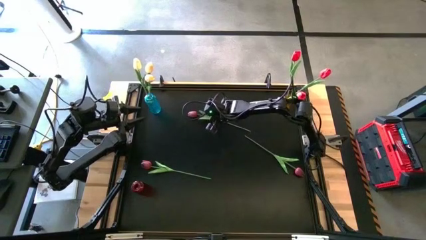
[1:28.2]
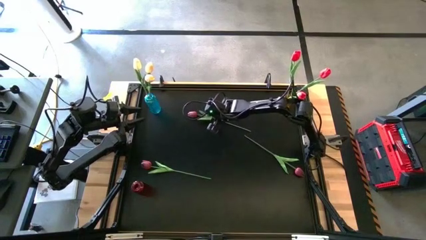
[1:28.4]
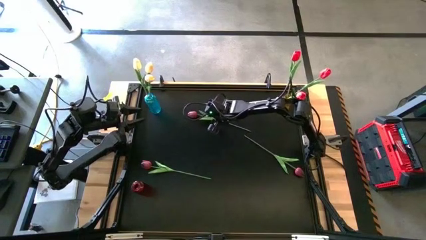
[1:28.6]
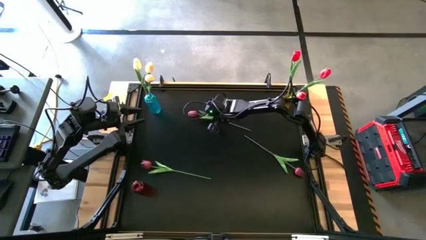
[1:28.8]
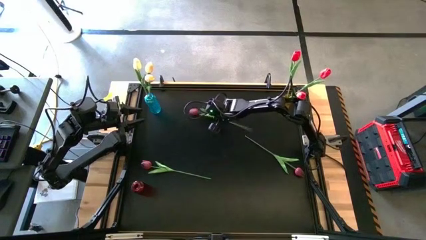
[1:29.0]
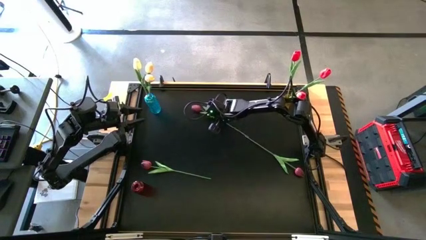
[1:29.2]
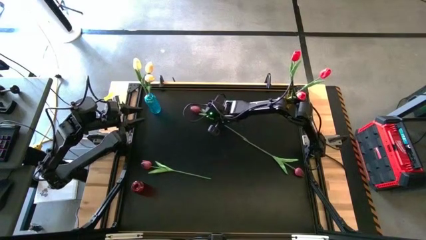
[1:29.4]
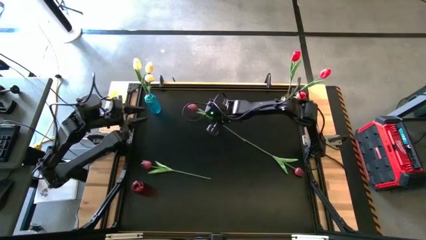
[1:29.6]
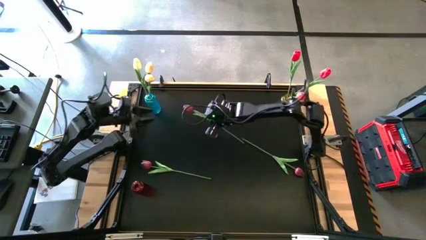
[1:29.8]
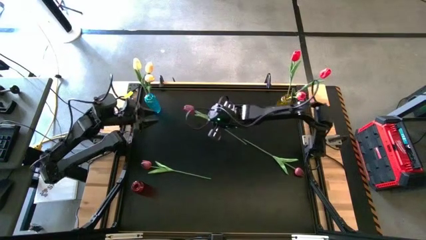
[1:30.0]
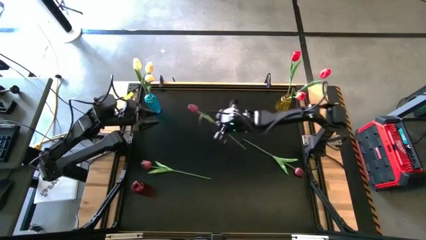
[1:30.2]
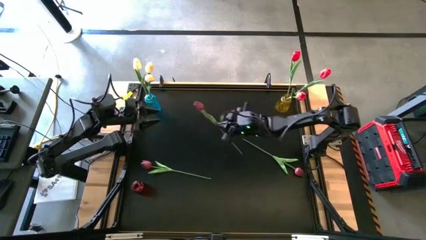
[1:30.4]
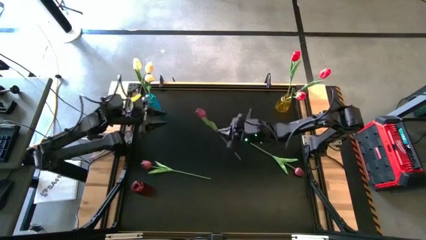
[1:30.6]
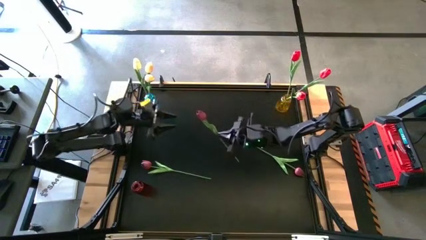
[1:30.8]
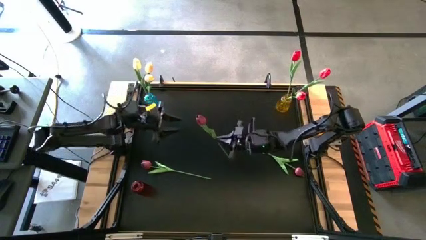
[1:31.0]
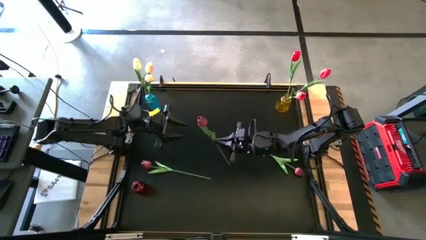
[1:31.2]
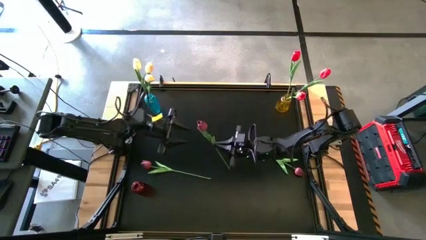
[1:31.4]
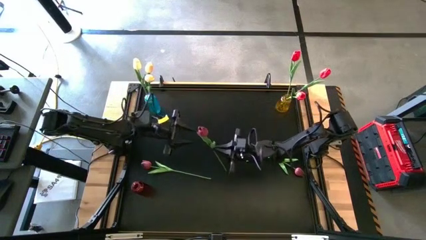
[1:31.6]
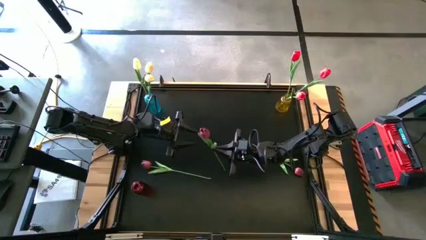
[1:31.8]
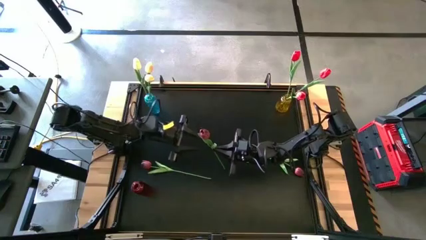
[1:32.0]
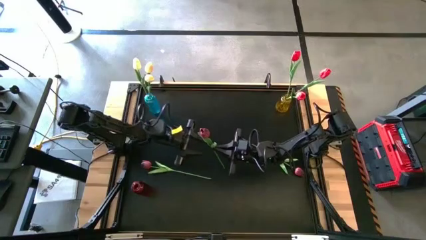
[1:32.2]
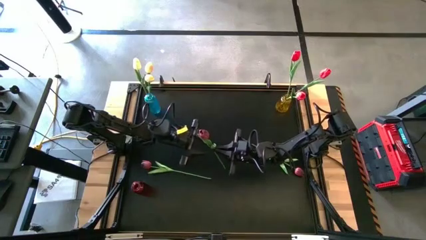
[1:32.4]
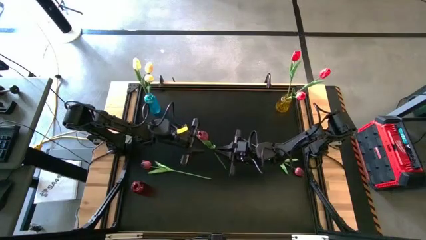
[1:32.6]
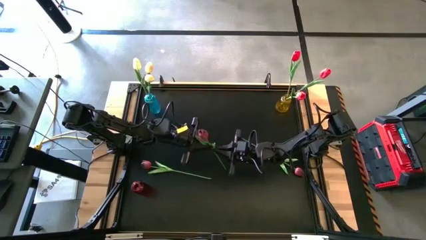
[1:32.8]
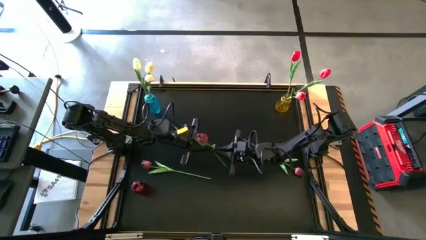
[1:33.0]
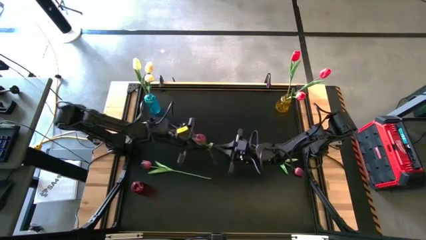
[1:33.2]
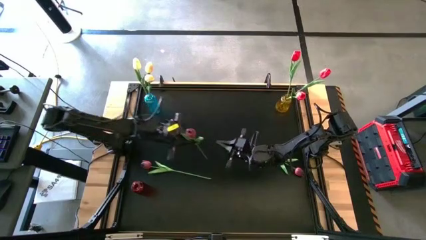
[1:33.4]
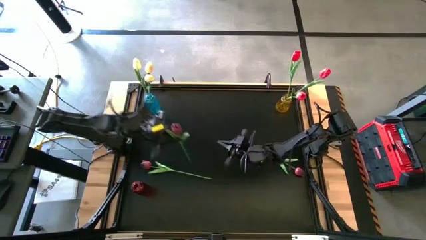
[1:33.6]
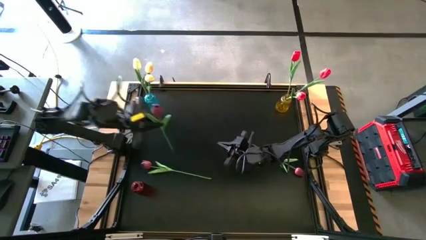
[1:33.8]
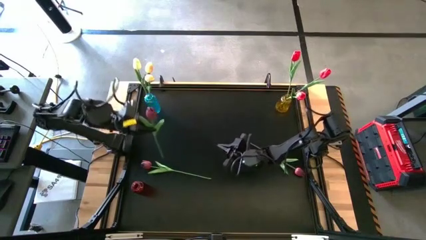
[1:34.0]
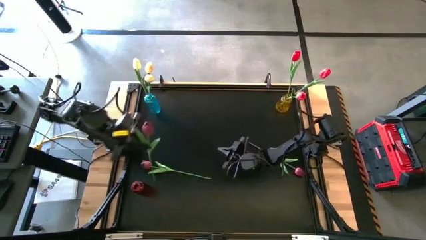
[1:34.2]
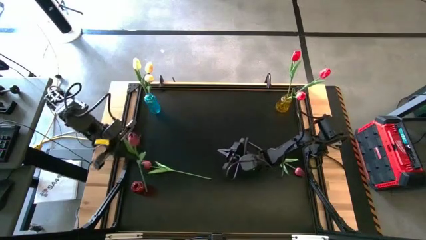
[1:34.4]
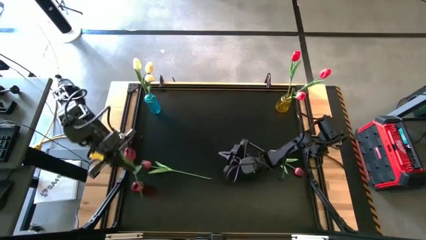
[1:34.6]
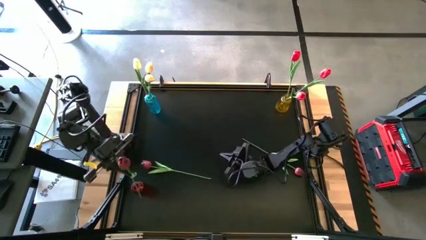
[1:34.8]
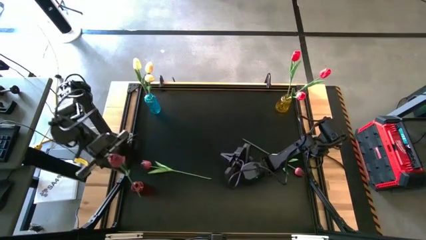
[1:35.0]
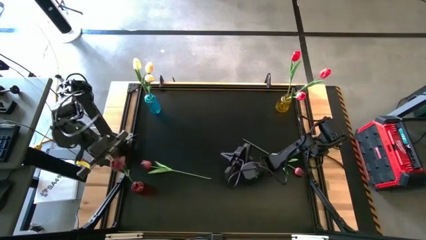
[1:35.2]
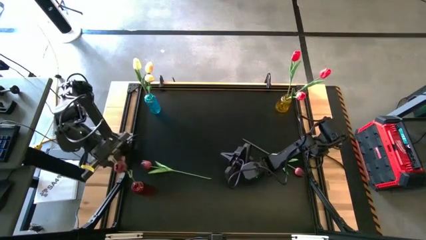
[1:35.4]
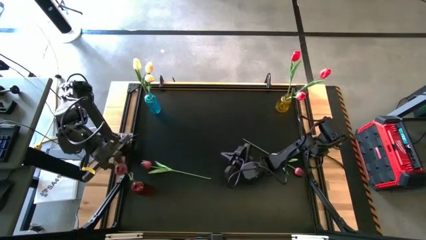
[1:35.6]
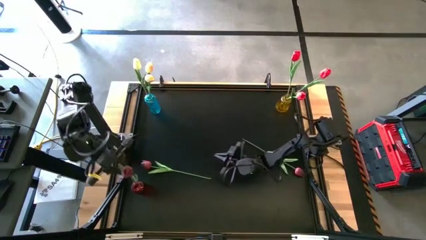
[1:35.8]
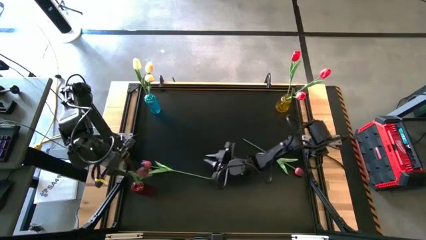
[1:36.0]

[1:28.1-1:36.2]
Task: Sort flowers into vase by color
Put the top dark red tulip into the red vase

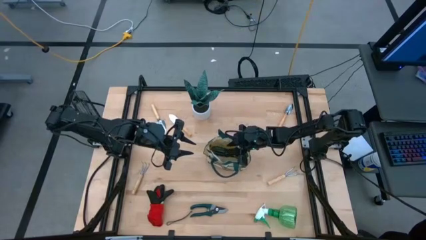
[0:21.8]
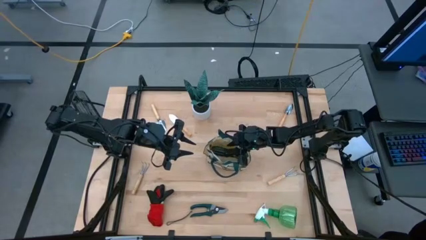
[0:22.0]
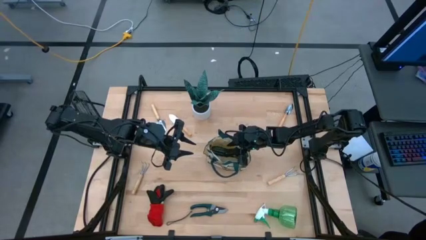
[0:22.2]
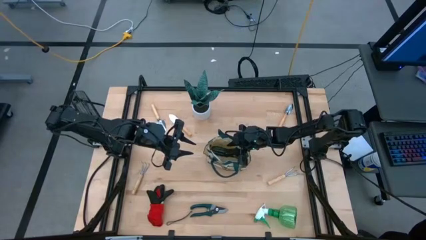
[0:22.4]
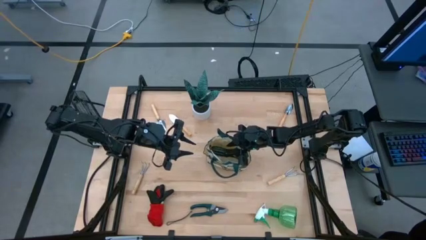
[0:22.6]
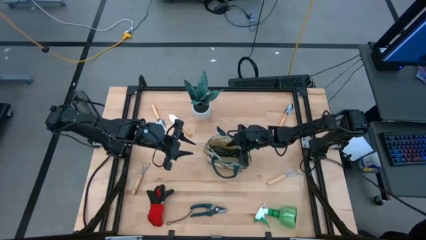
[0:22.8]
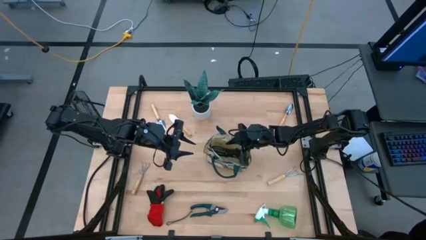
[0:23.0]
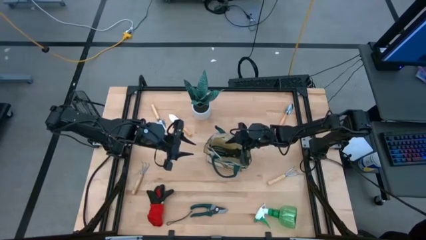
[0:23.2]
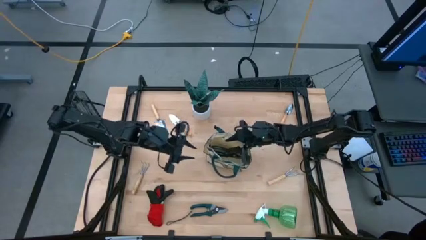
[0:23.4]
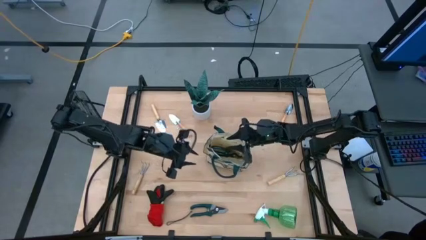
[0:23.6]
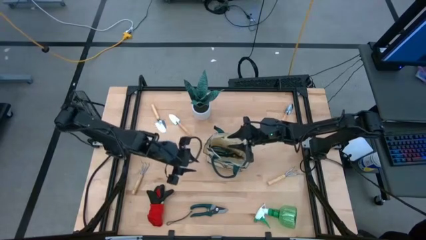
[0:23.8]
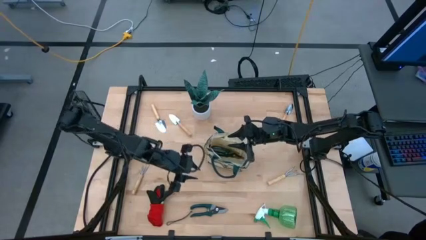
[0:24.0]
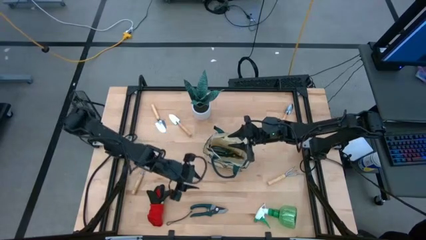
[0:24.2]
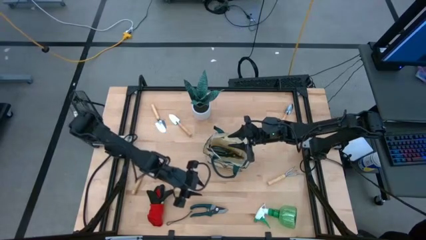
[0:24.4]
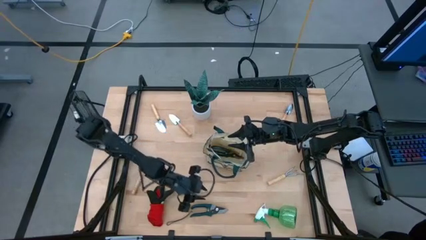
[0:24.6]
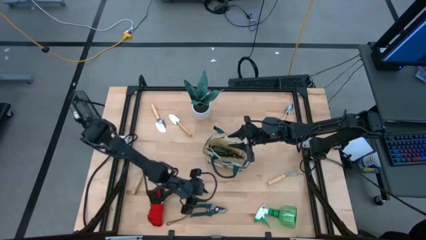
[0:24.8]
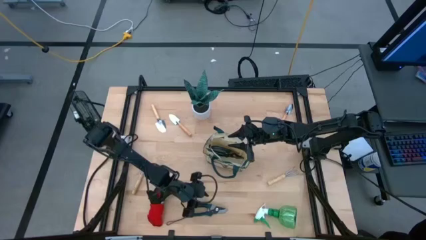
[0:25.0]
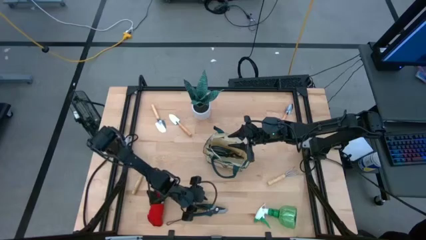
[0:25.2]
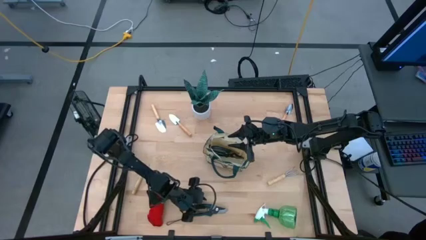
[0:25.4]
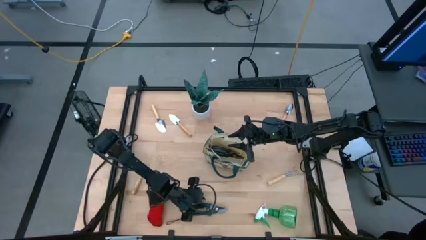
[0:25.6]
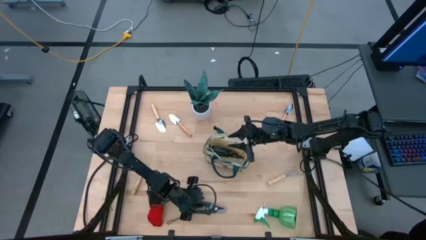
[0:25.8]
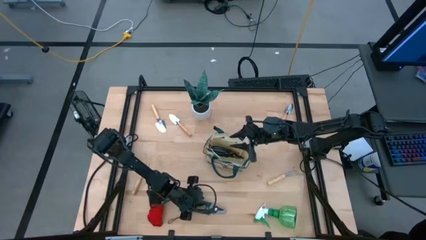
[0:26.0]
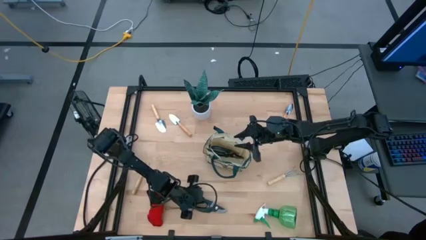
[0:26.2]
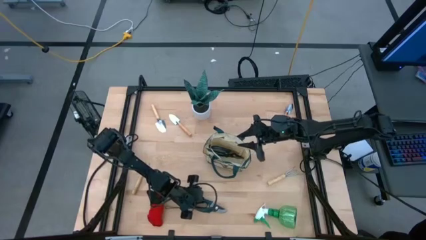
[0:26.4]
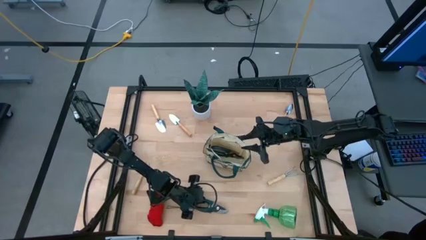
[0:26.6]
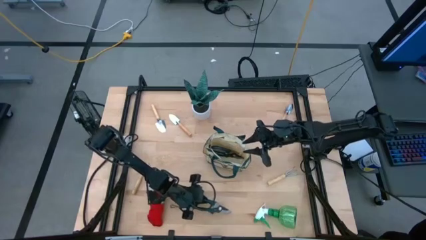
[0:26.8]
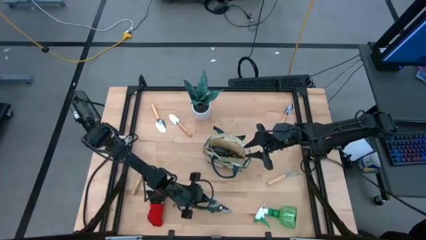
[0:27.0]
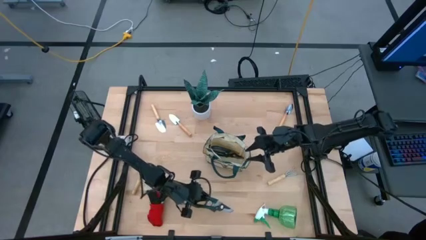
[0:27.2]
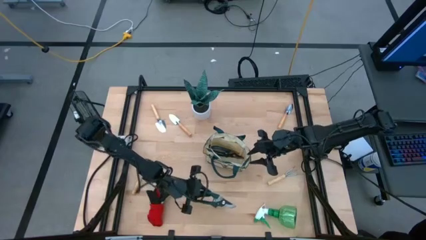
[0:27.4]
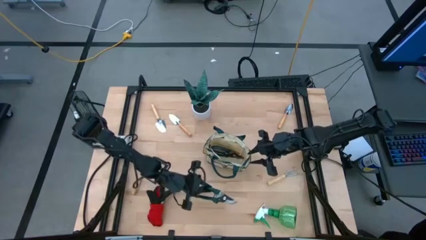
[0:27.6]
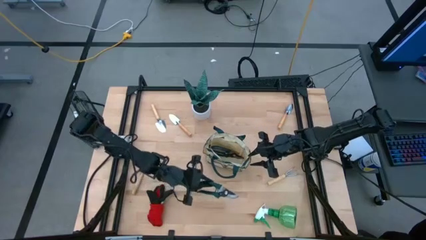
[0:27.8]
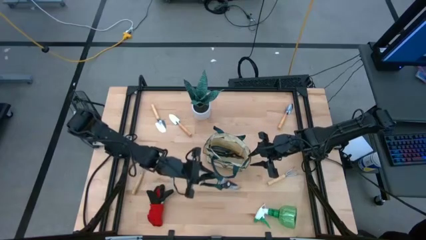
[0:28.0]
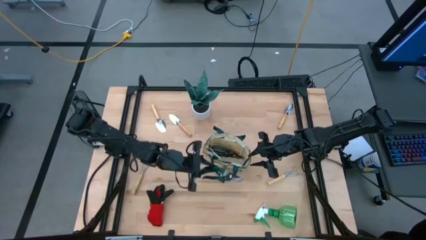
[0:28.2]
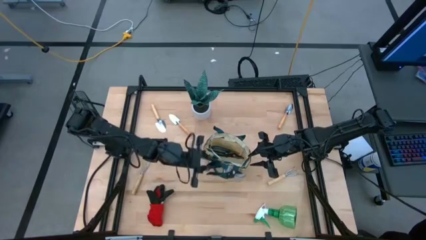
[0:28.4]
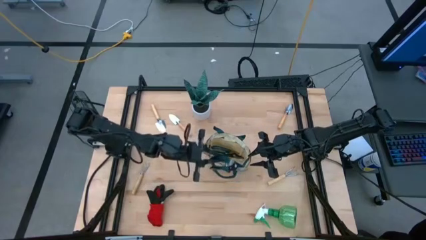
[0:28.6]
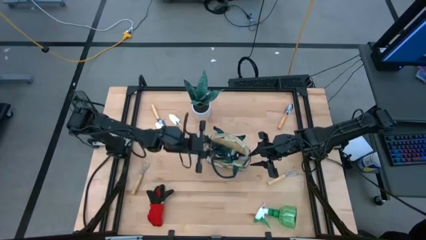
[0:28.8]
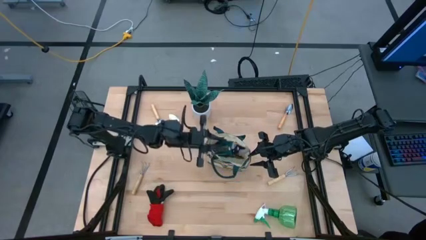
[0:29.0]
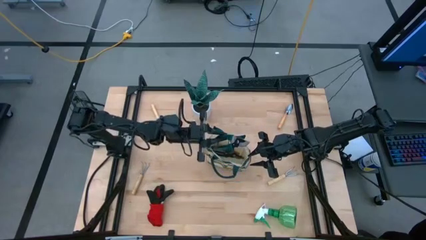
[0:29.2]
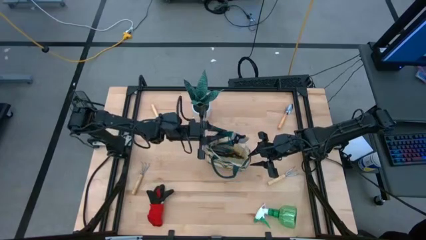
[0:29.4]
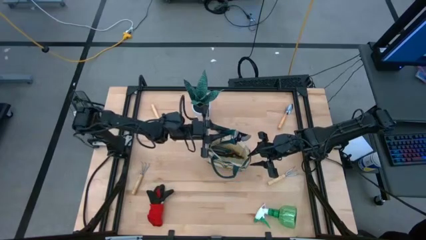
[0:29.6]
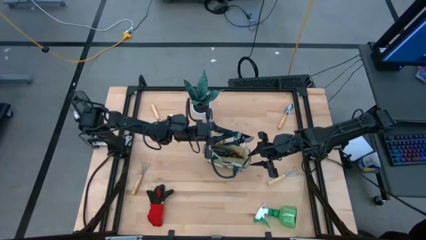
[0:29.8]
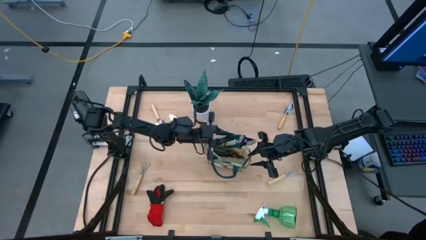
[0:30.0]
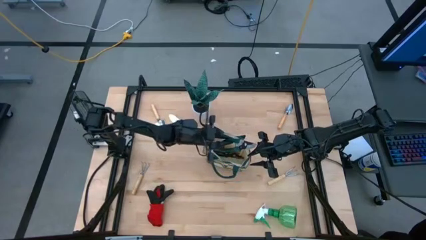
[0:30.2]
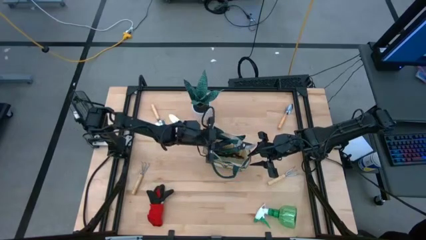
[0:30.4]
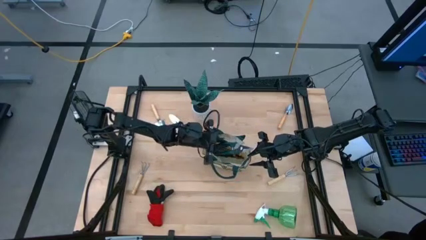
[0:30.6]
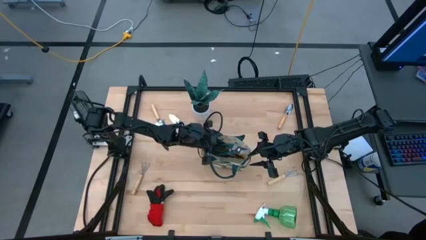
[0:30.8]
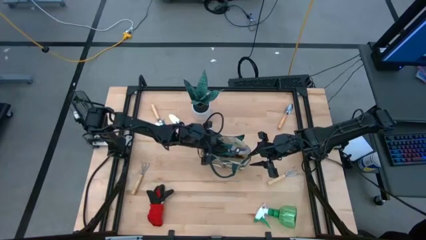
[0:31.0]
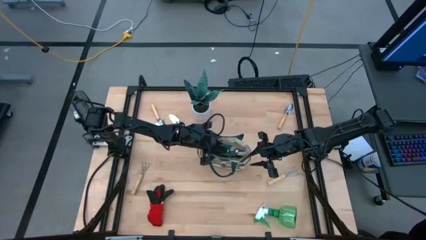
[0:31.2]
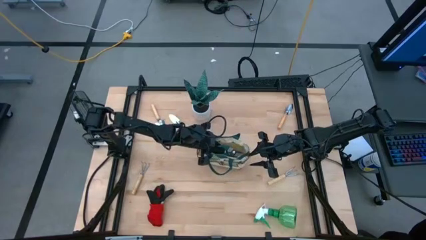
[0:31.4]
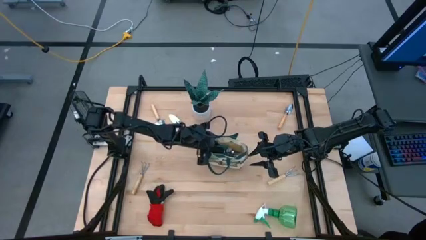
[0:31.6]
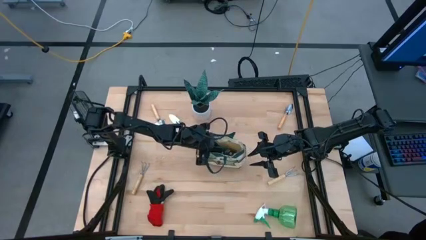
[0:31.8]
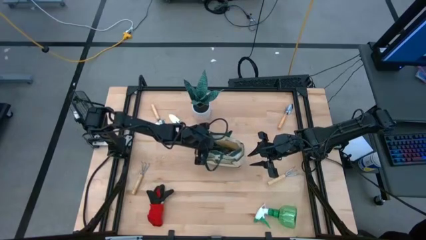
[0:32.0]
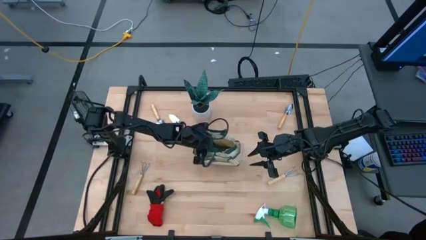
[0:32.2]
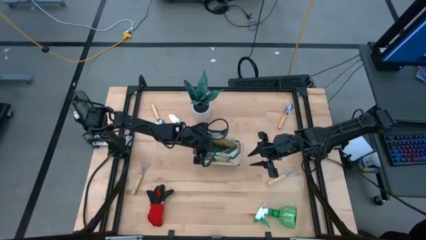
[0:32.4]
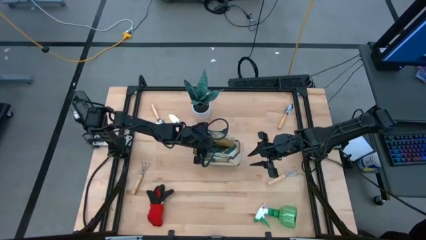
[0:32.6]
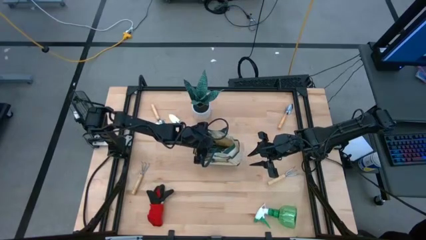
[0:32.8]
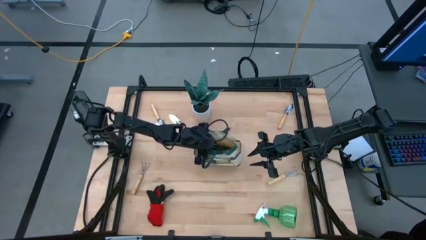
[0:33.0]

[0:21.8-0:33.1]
Task: Pick & Place Garden tools in Gardening bag
Put the shear scissors into the gardening bag
